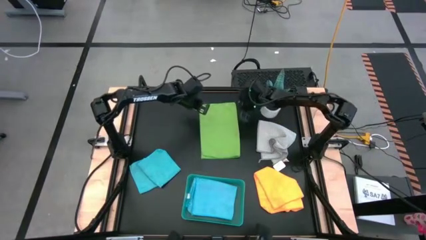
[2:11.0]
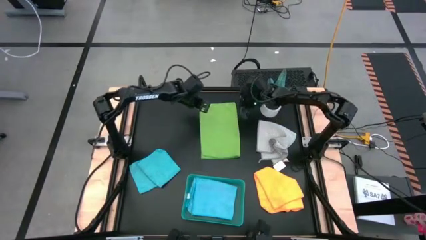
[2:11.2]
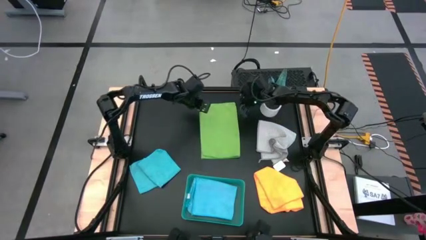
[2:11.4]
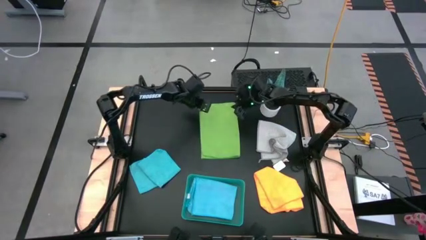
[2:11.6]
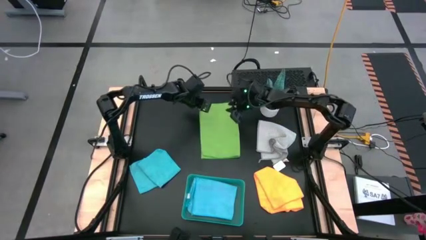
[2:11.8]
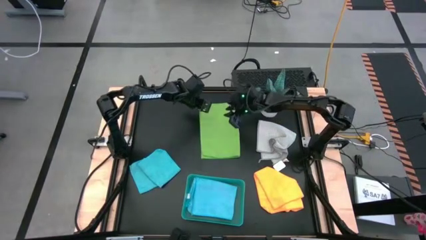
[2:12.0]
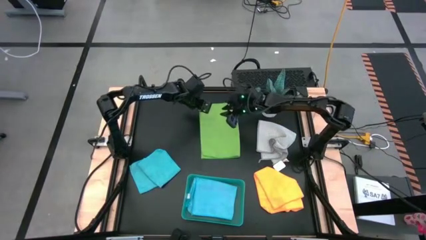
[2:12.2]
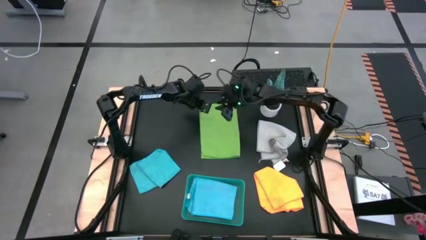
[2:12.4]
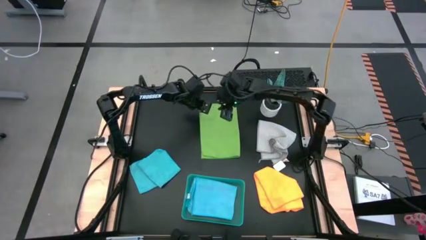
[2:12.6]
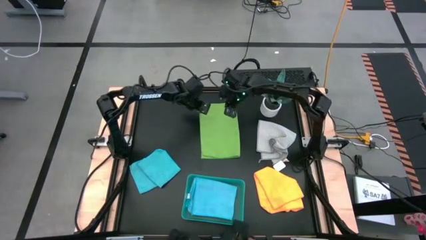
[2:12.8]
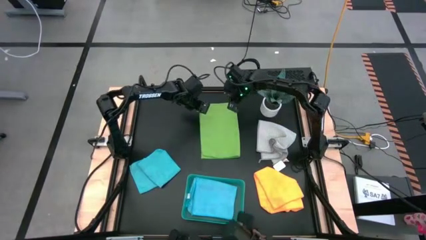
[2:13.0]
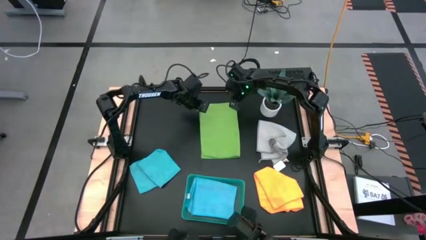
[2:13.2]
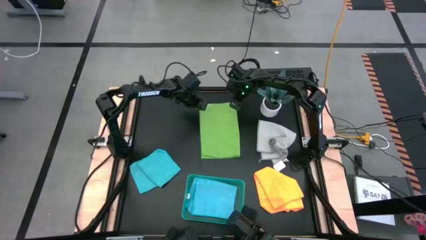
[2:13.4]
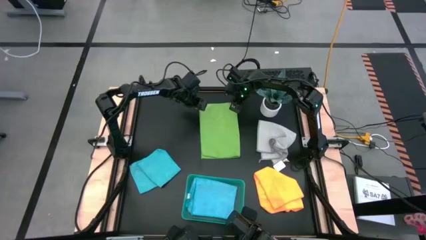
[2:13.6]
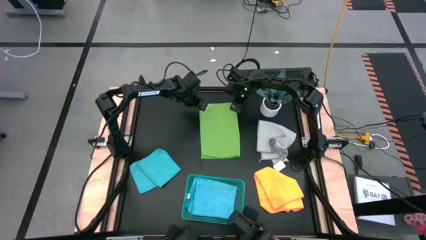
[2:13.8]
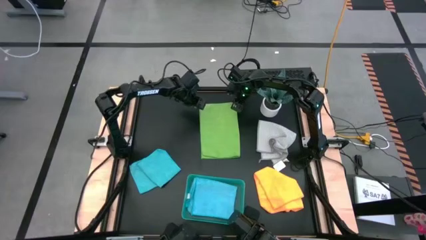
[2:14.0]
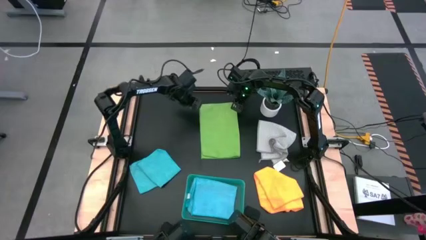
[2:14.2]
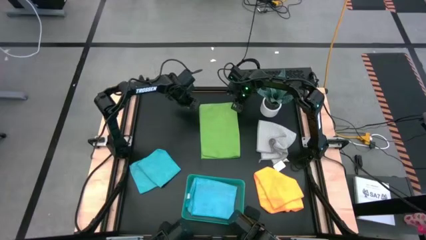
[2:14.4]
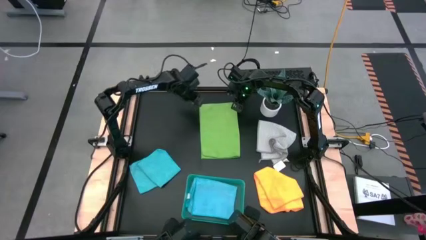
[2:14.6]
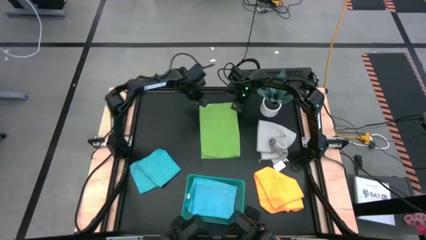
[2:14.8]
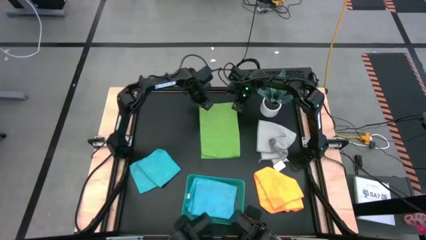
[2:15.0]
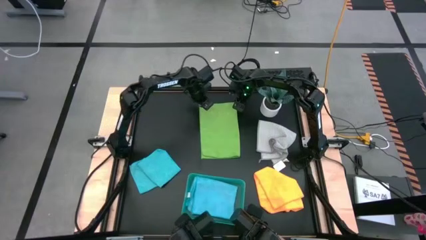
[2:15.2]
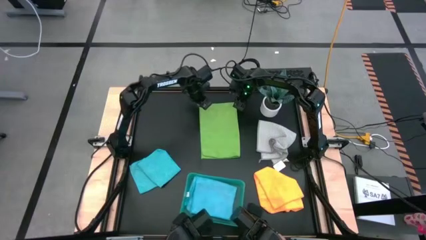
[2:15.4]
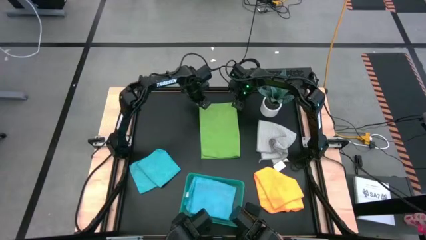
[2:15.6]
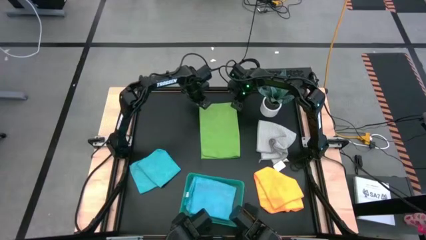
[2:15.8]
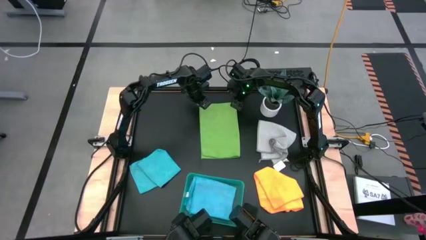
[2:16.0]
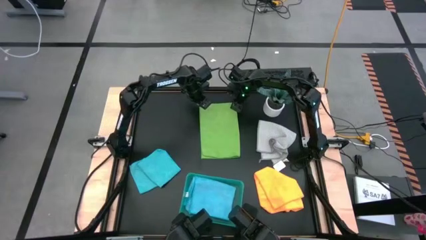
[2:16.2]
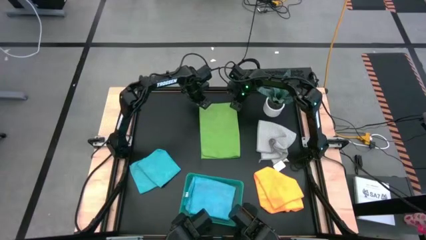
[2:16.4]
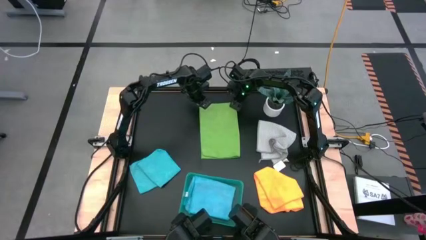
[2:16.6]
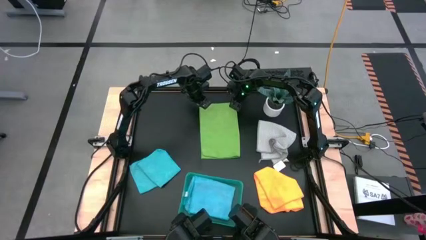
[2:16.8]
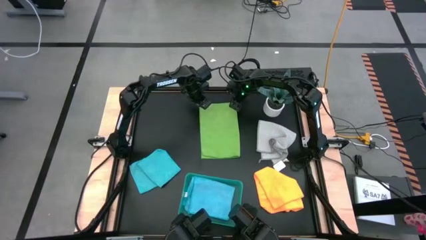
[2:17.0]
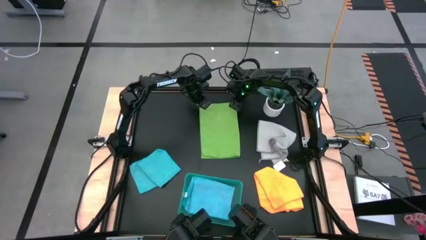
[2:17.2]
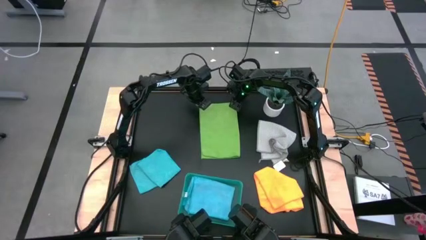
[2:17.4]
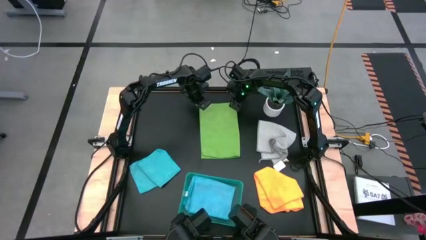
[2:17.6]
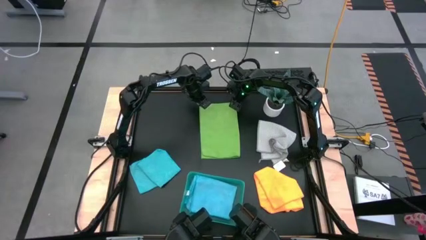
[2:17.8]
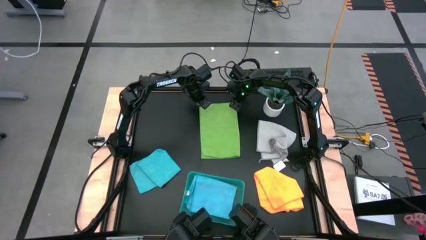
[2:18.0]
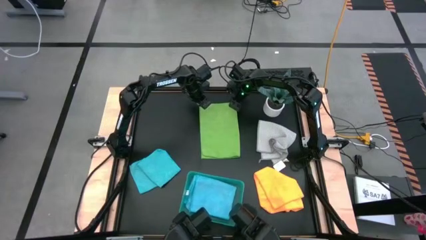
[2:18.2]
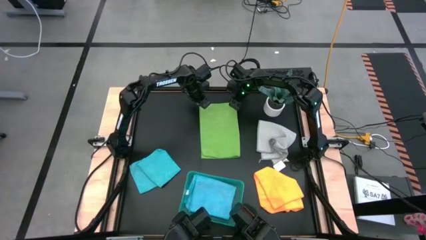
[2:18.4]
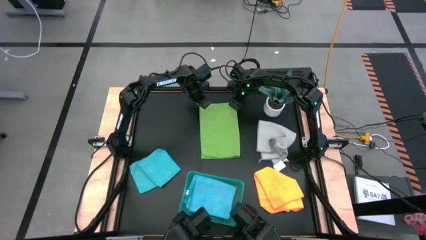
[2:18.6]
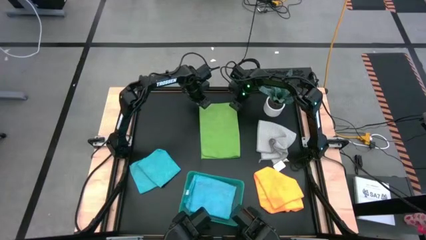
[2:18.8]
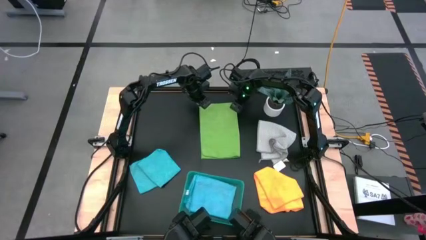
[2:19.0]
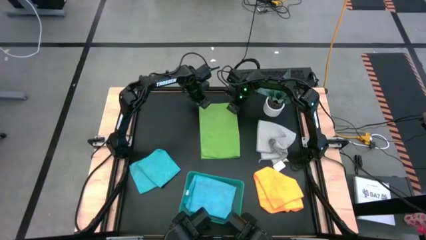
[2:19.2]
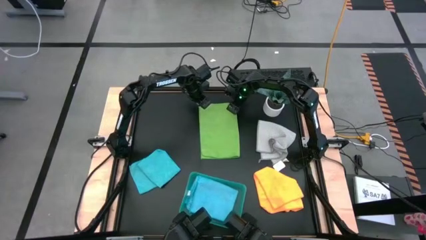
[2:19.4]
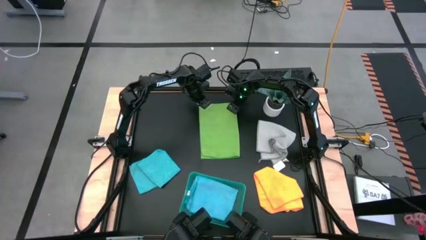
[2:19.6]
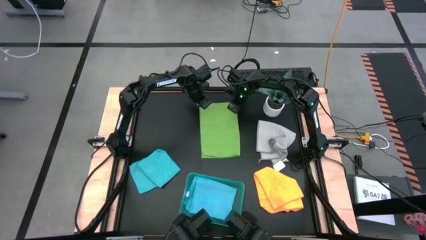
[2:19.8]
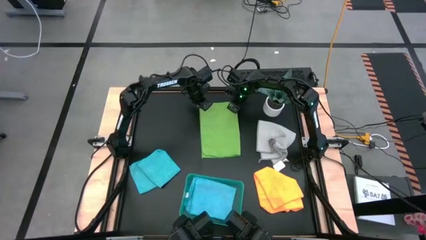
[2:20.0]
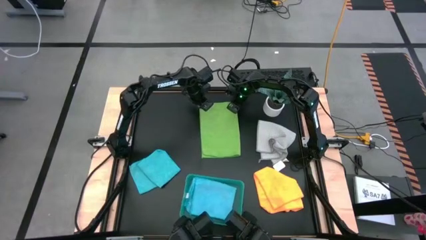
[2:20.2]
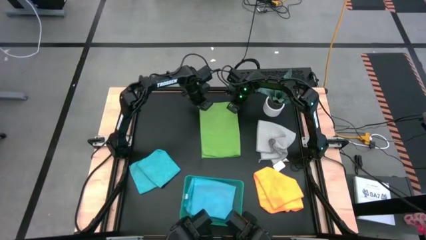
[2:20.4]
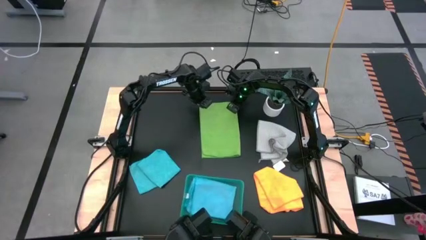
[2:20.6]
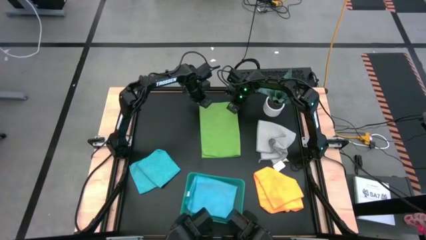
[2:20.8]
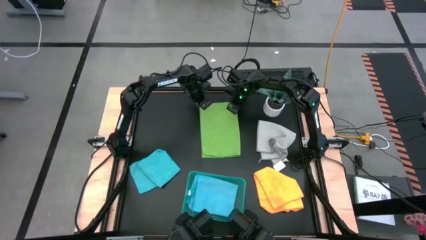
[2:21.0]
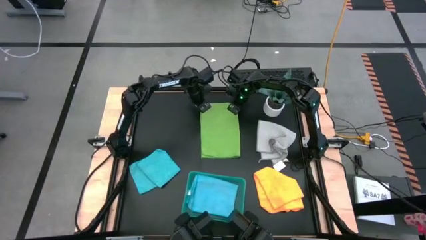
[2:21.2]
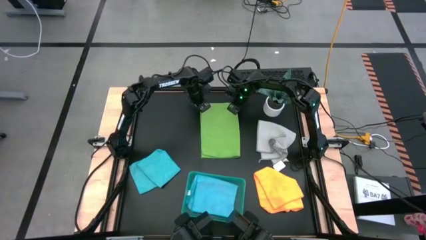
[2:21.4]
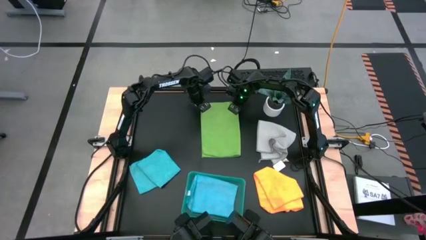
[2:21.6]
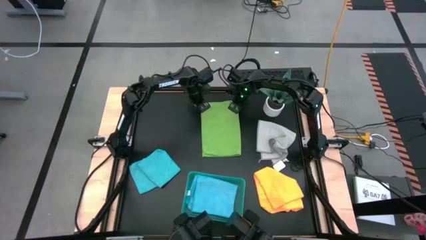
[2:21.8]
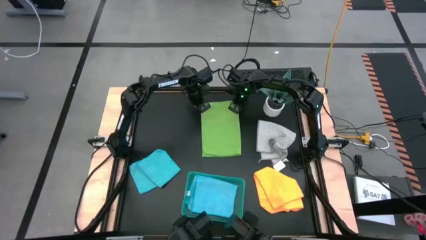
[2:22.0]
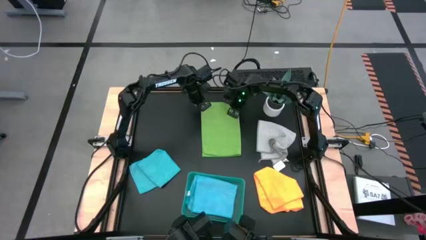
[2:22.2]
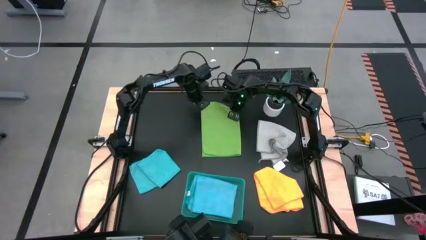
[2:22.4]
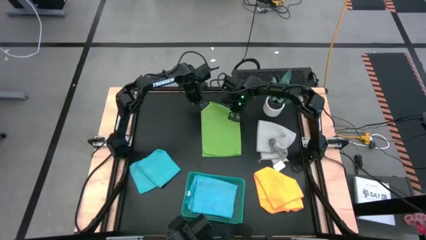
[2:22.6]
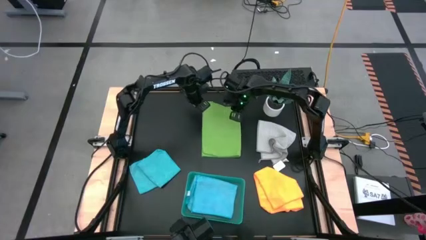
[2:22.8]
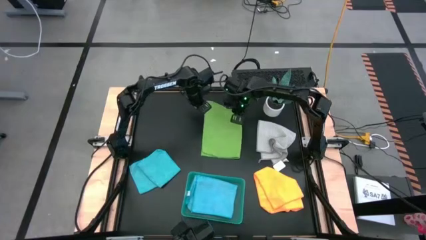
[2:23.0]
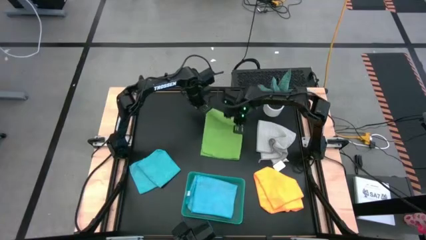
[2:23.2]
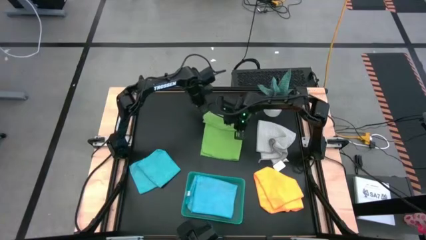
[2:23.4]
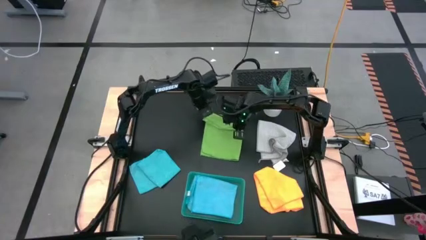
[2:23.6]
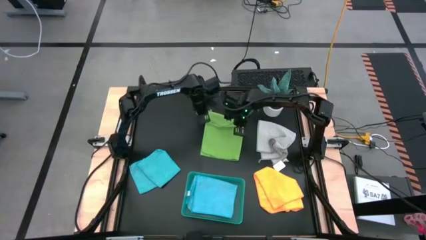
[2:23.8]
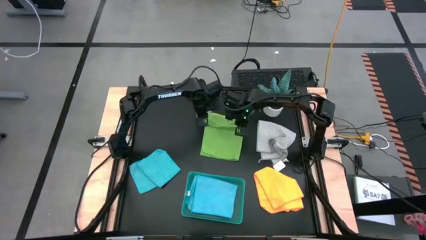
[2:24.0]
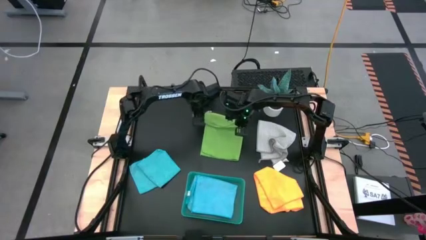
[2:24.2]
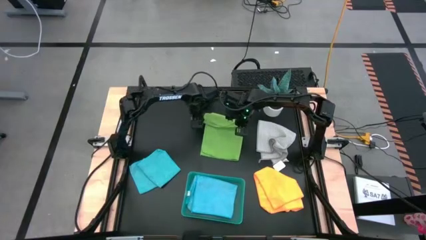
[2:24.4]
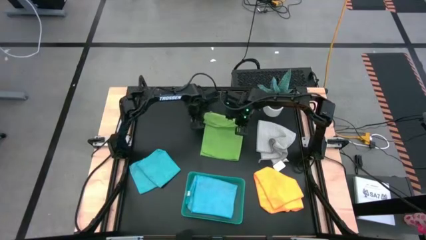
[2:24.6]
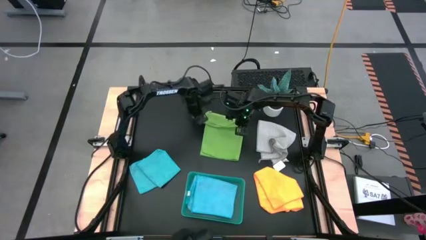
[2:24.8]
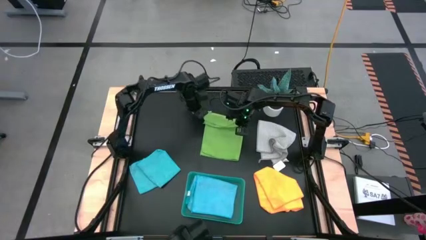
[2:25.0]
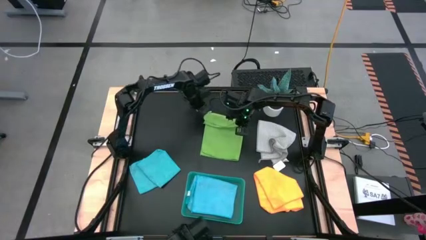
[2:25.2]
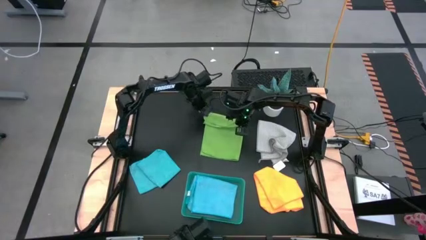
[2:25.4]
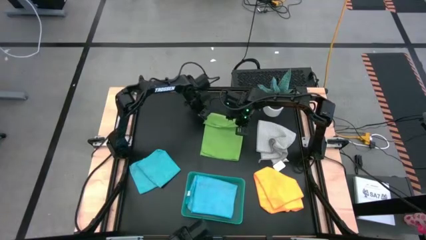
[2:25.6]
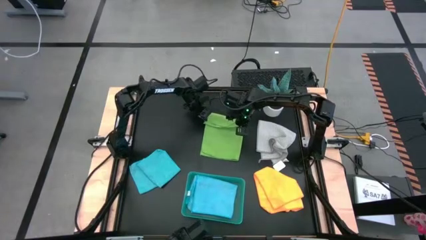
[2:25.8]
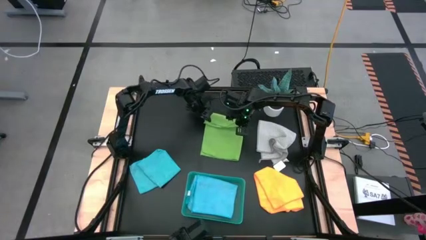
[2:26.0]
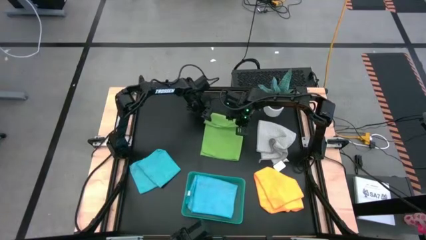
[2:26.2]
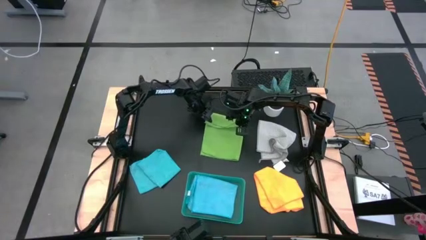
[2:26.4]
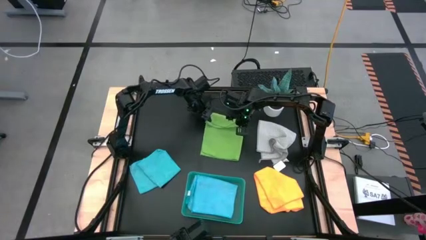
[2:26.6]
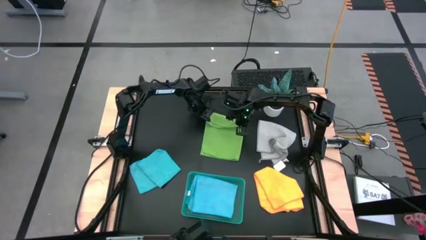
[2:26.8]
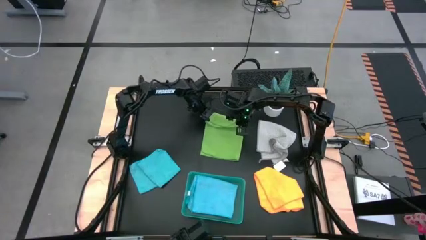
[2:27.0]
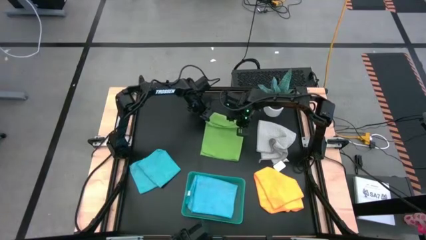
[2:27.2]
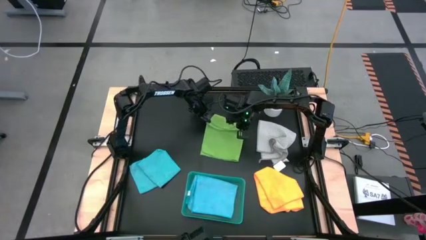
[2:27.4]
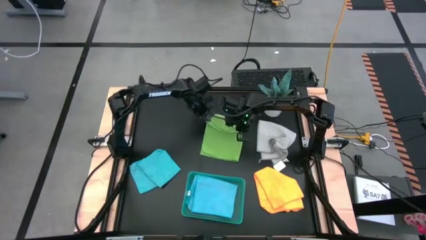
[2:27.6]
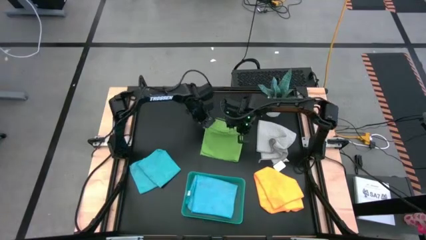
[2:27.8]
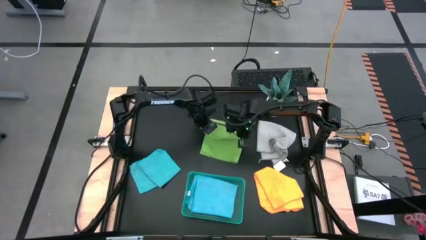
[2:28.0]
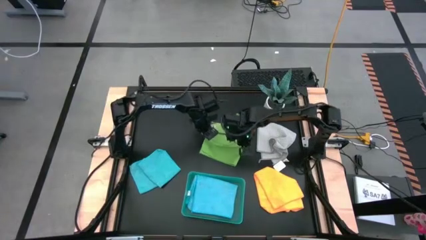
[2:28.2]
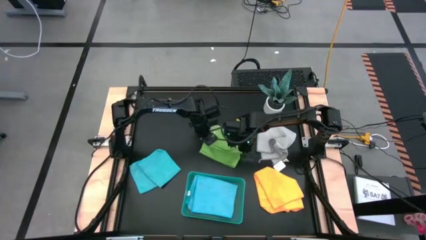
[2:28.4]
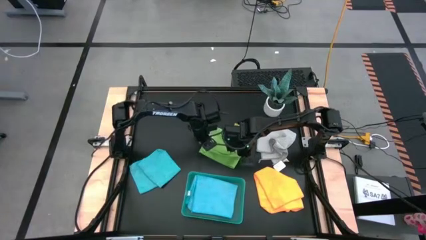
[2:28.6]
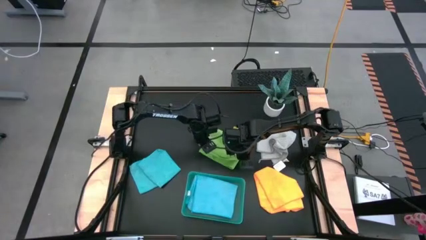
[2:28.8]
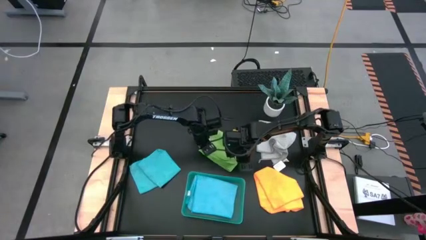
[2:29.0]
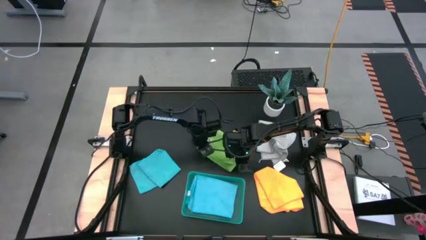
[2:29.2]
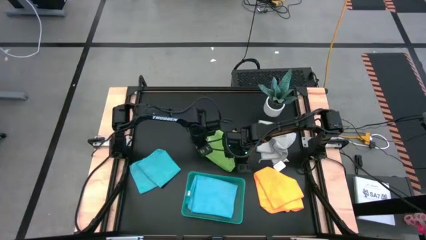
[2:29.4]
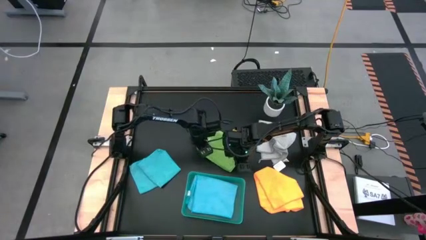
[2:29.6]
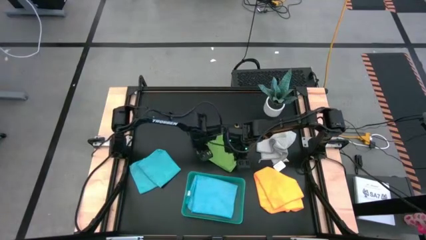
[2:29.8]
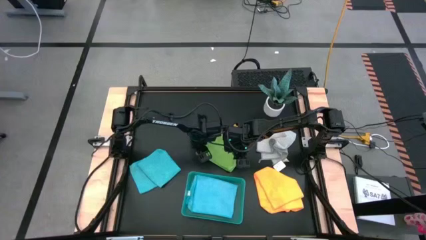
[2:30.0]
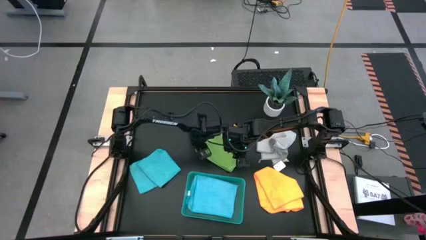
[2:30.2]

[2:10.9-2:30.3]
Task: Fold microfiber towels
Fold the green microfiber cloth into the bin
